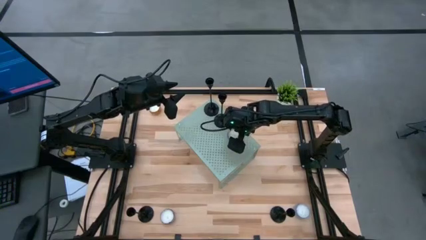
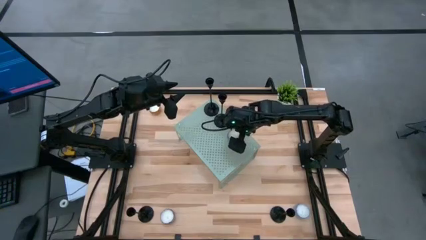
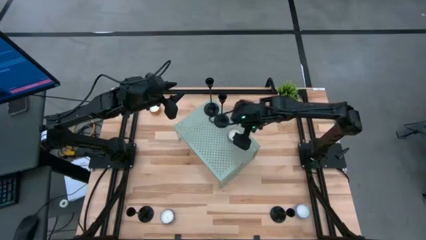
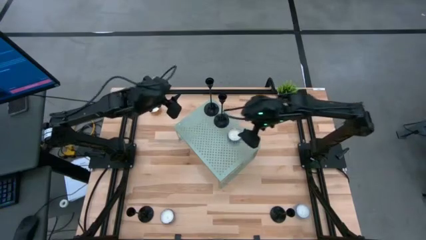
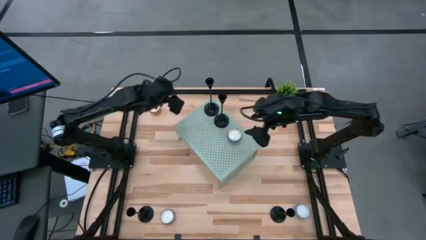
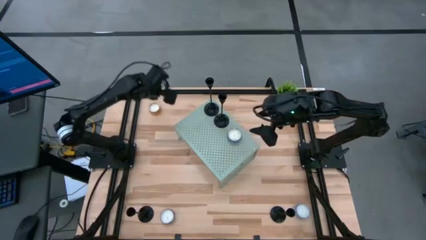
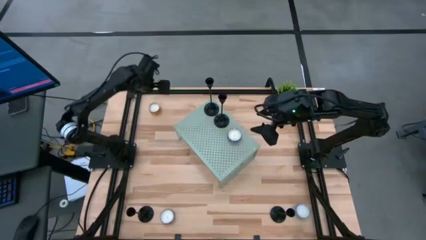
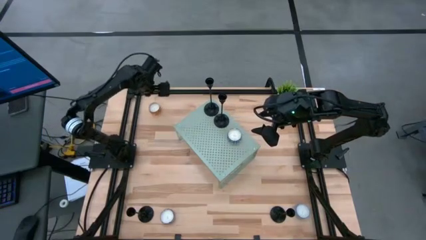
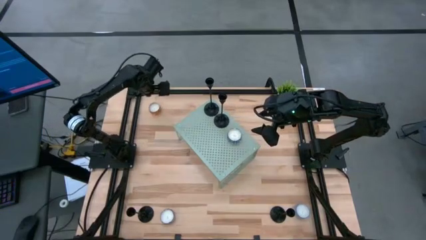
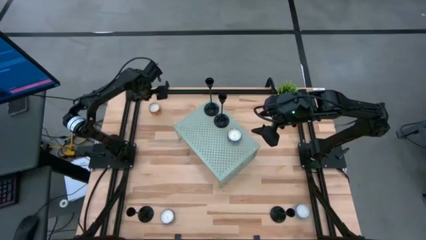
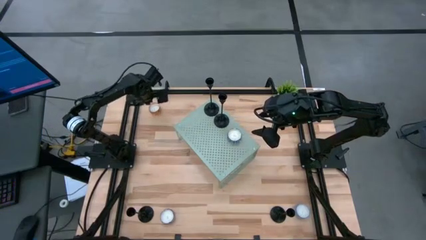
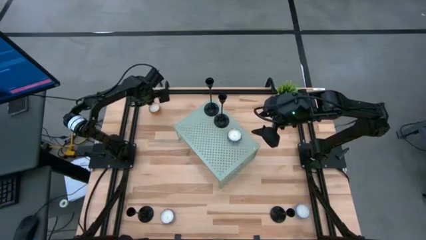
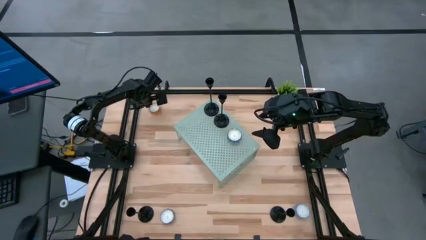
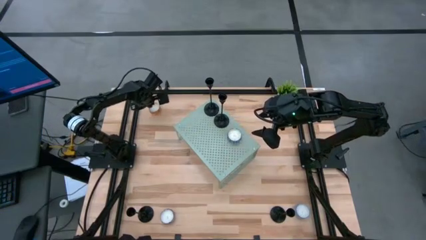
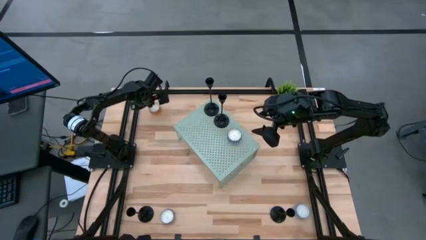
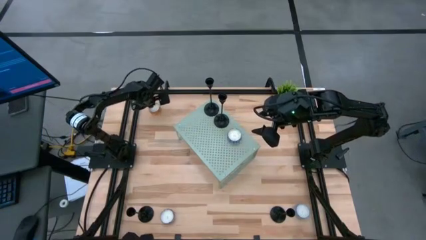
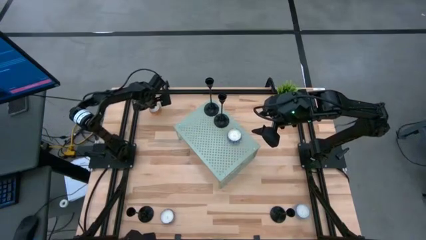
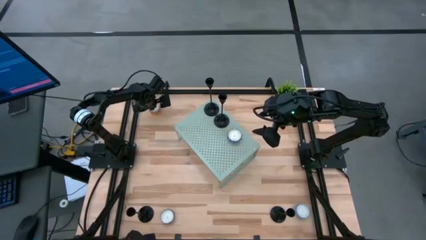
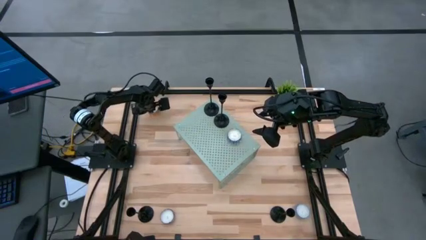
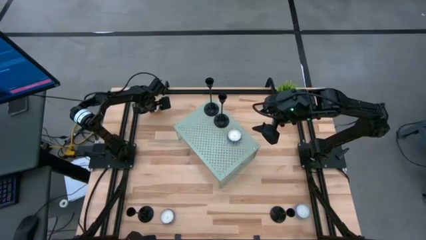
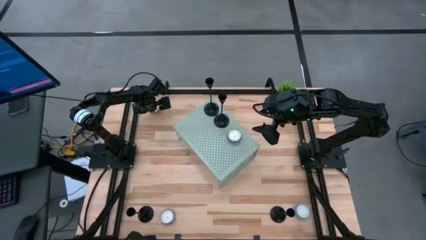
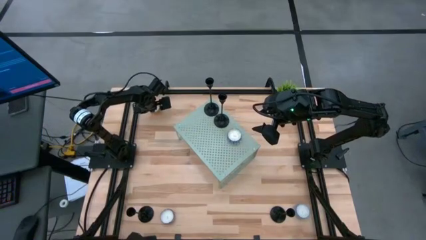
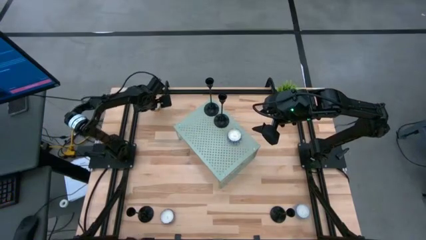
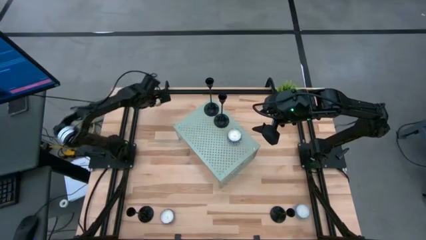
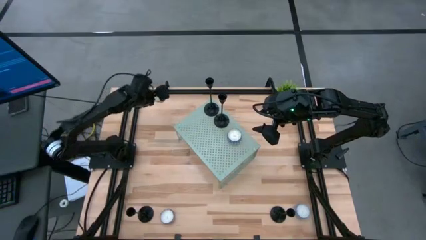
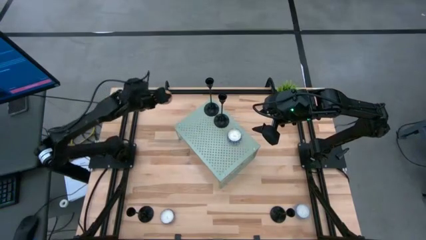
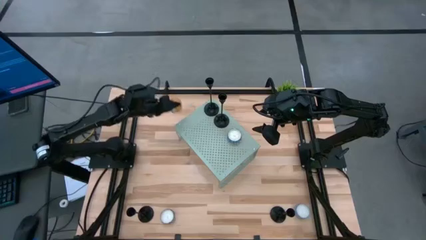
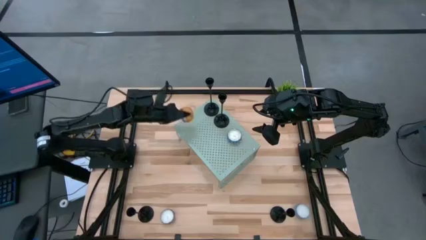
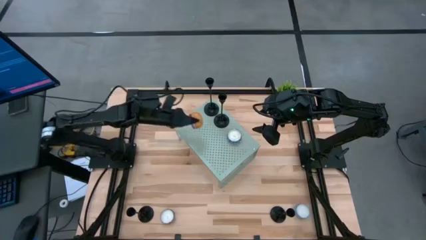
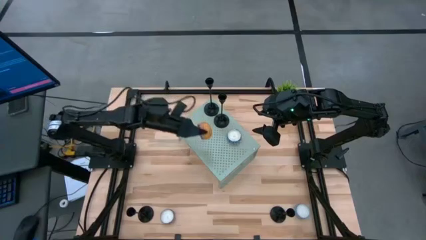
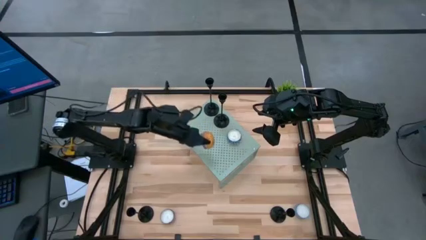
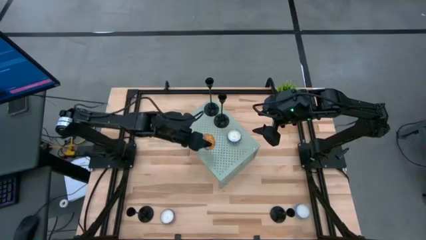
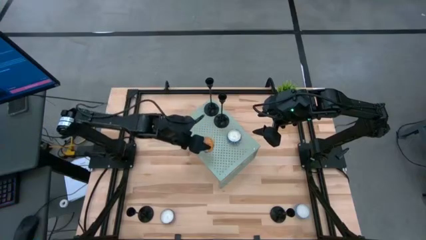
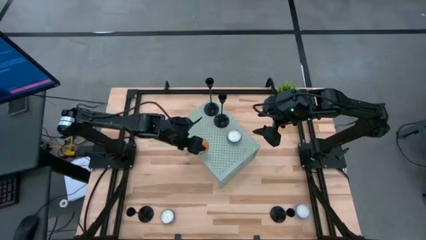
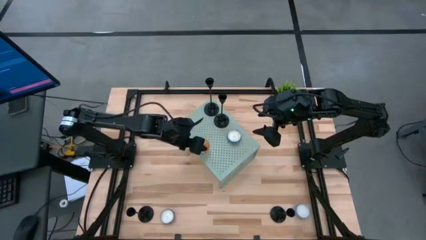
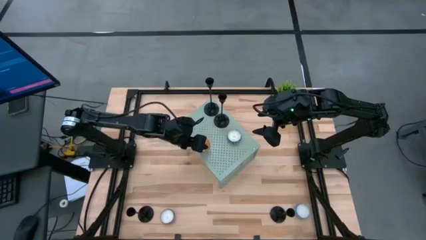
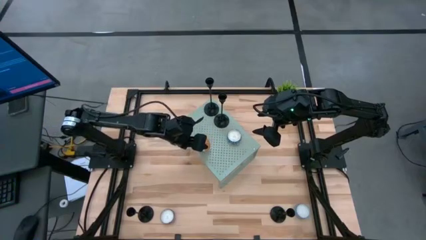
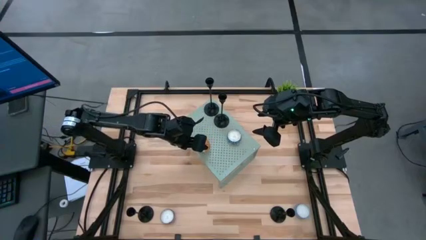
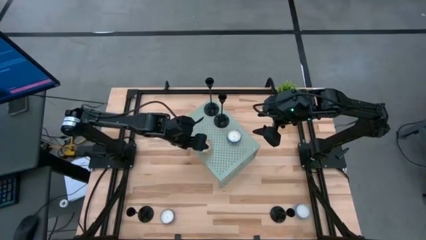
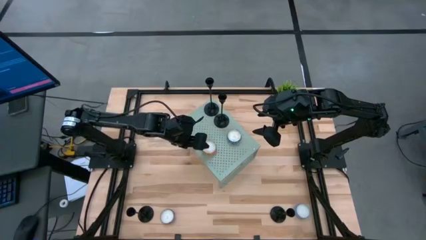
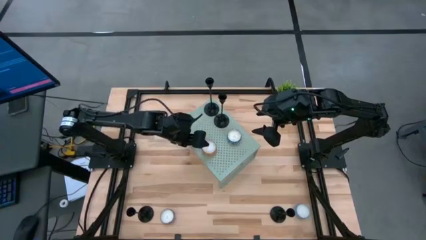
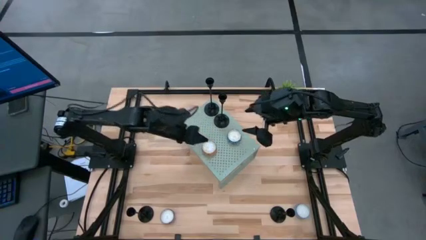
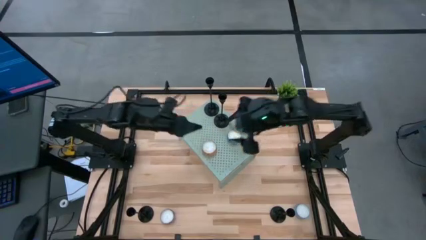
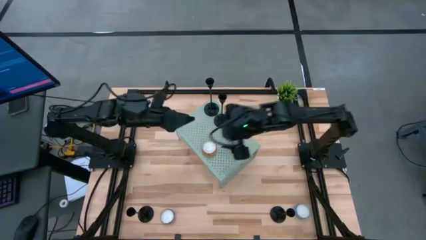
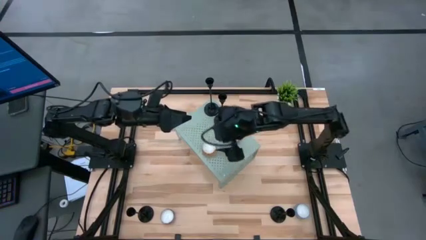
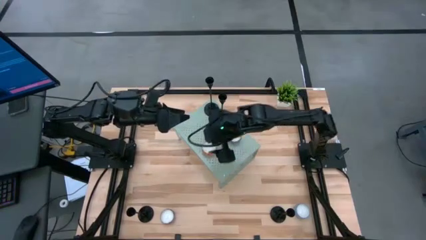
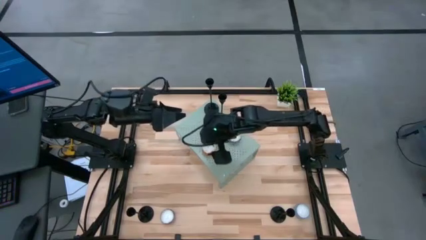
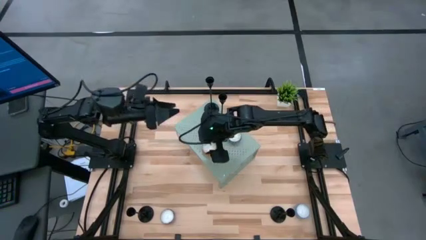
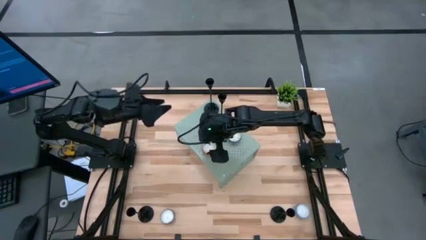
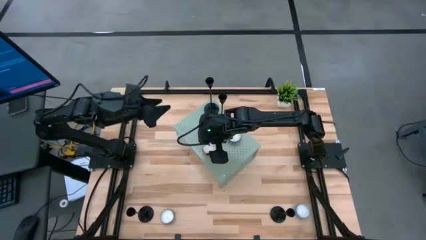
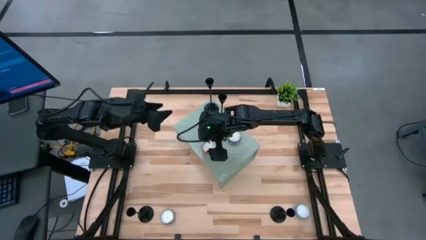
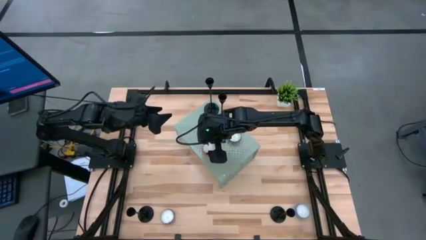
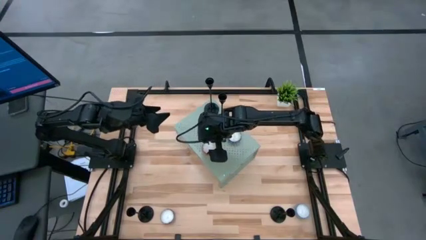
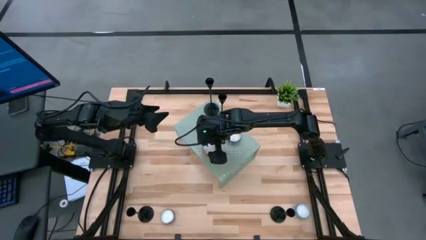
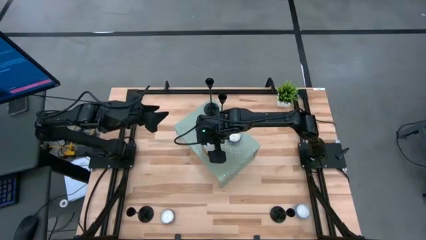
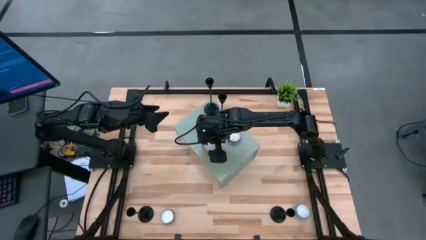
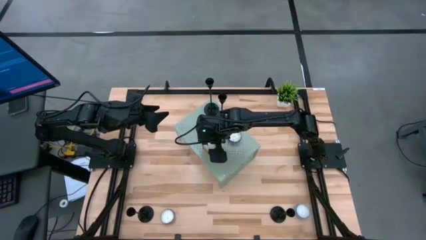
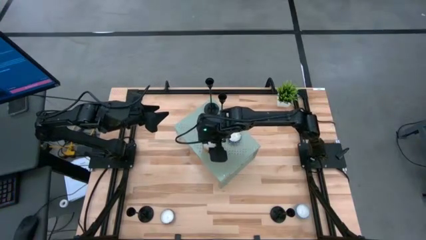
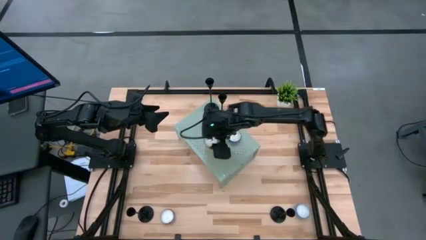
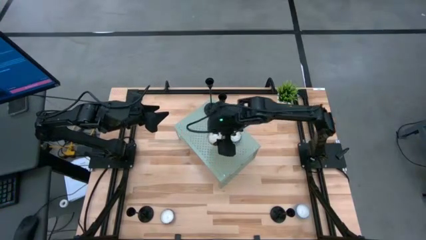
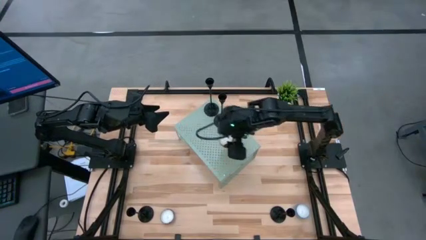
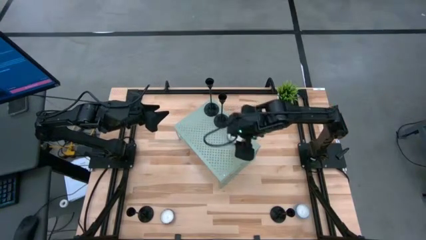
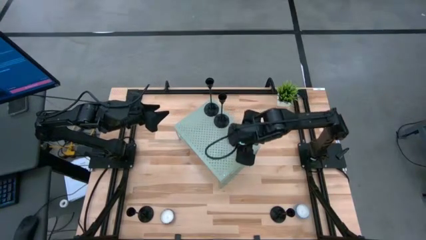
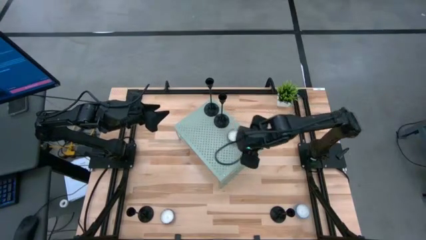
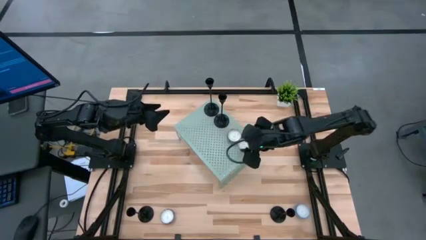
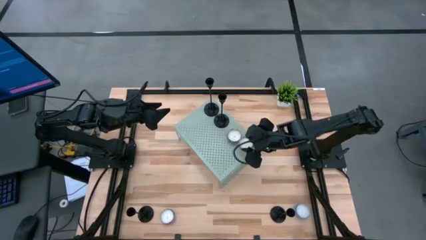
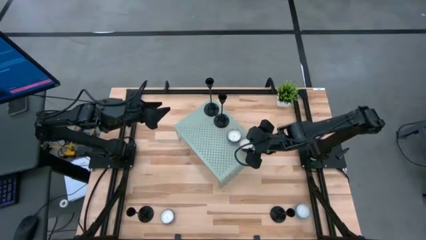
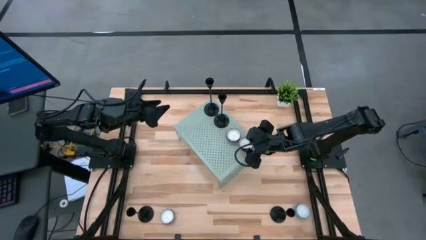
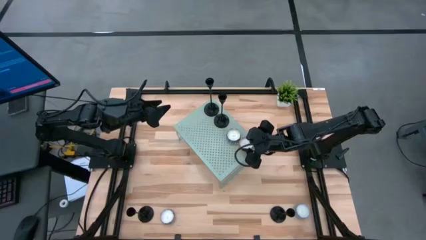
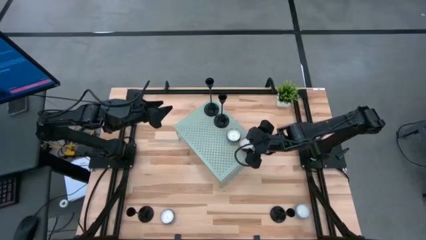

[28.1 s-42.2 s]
Task: Pick & Place candle stick holders
Put the orange scented candle on the shelf
